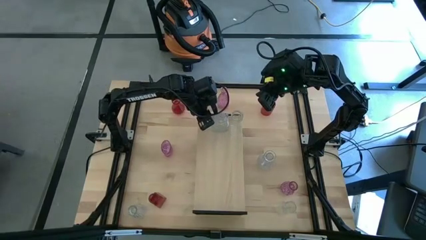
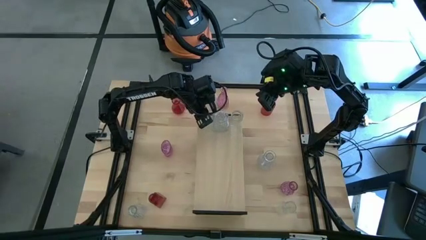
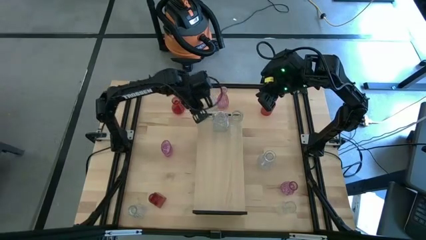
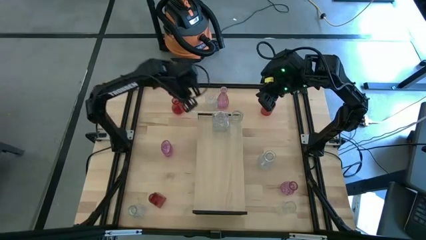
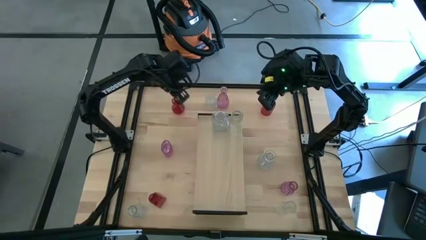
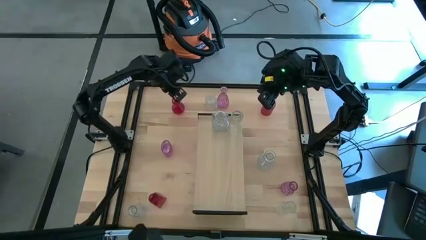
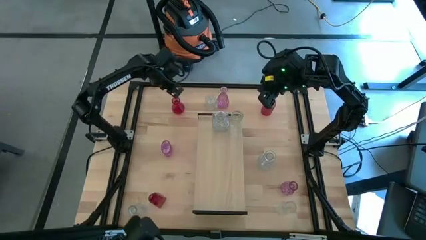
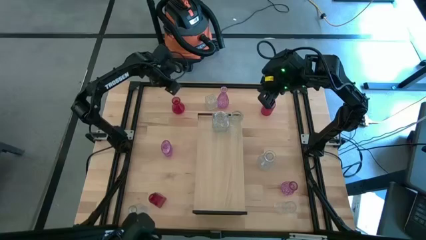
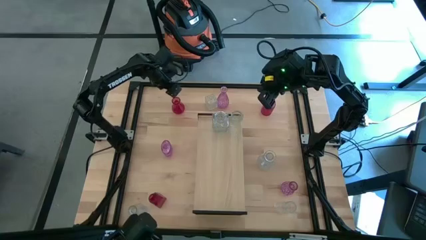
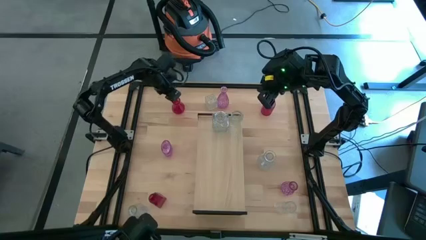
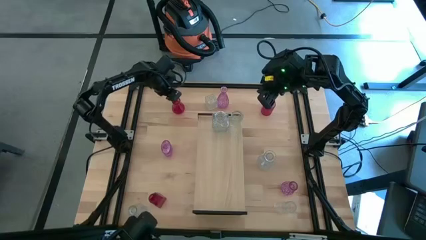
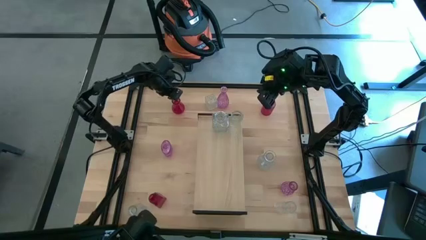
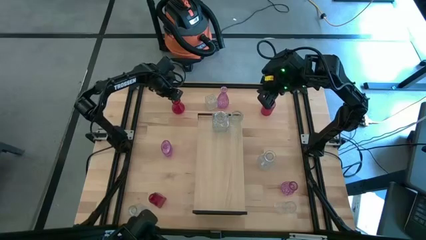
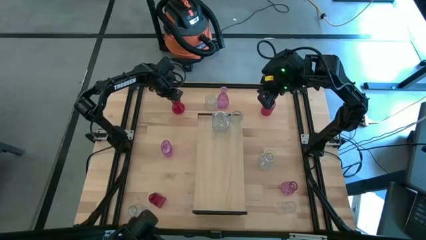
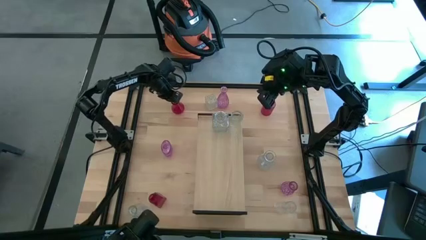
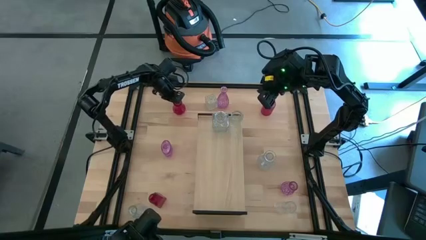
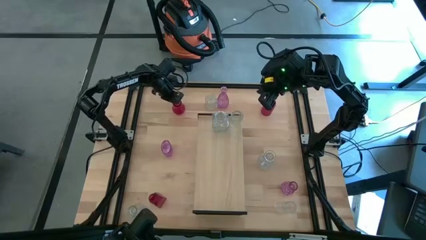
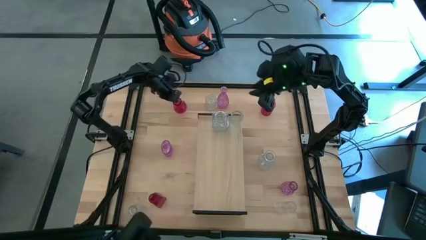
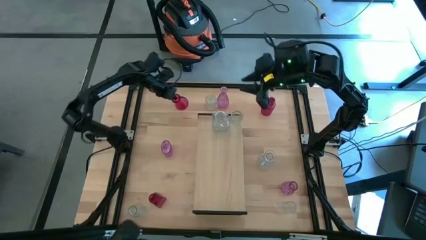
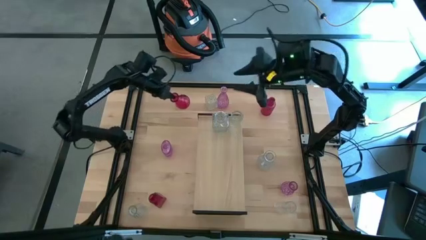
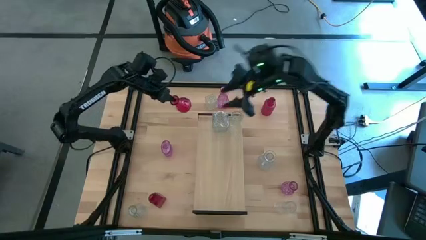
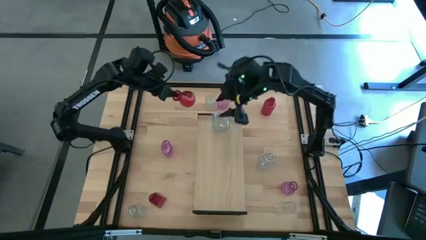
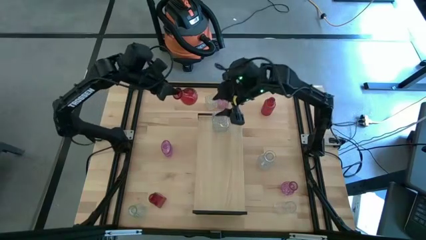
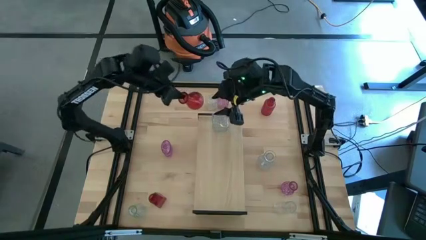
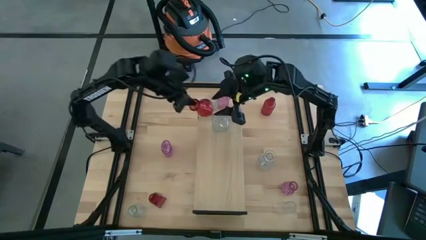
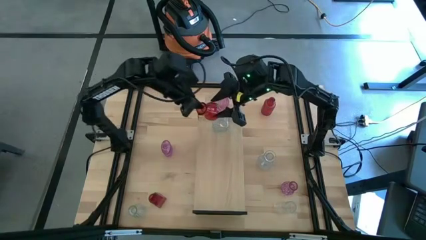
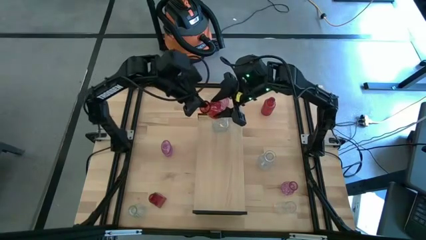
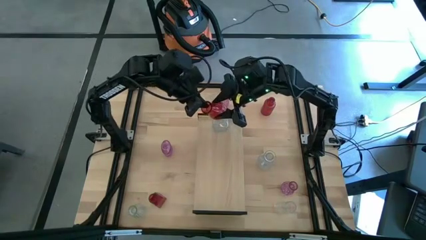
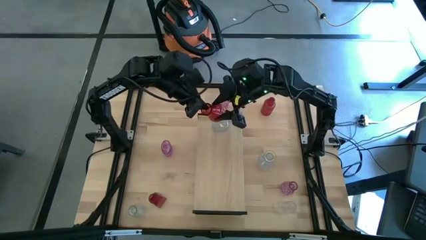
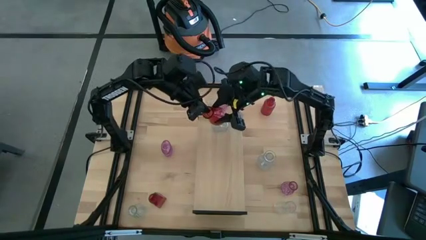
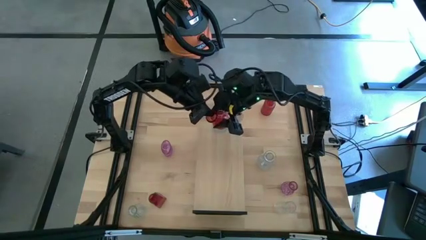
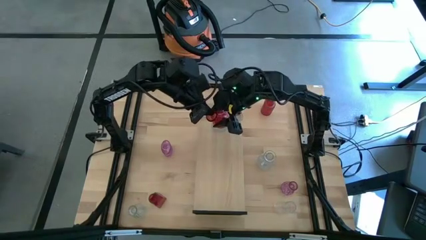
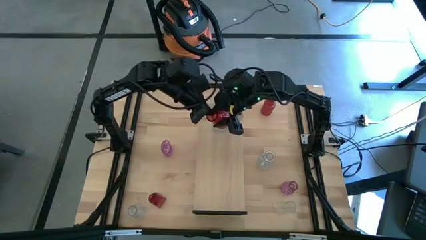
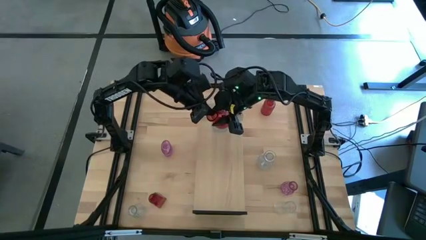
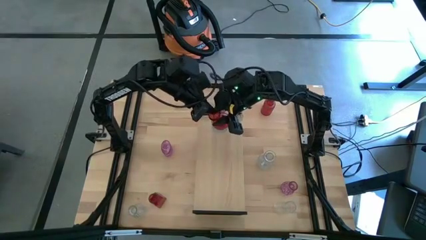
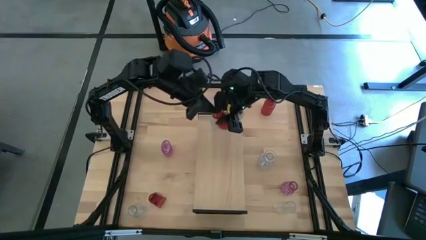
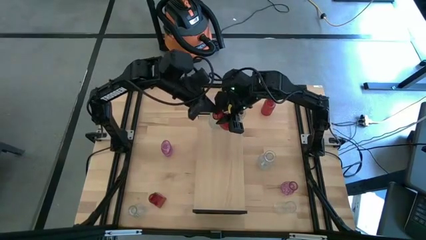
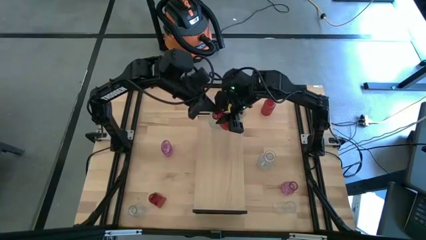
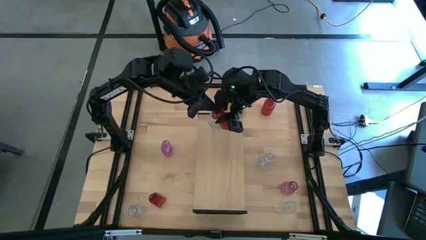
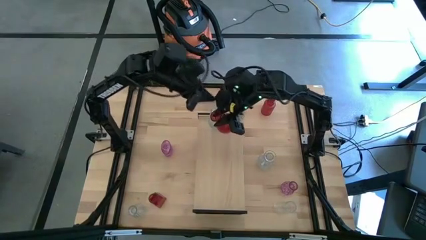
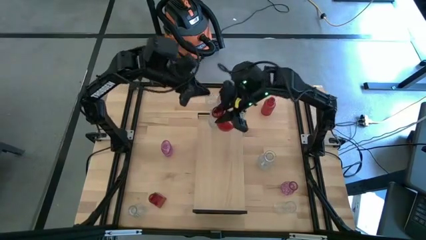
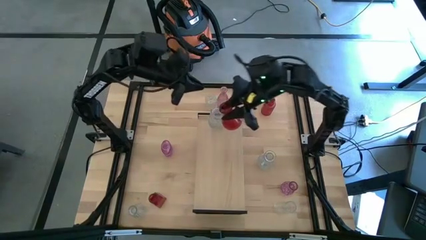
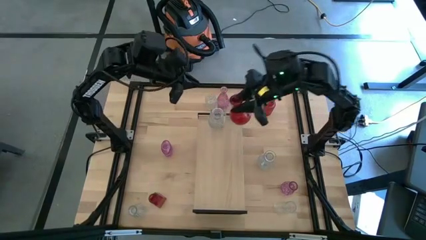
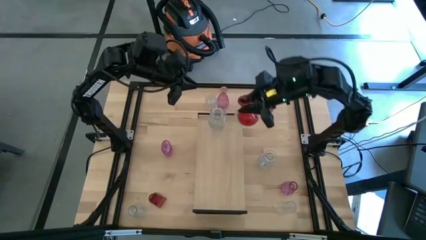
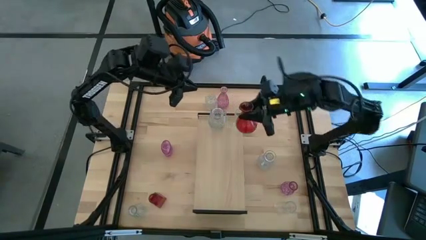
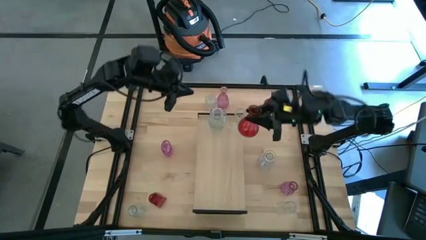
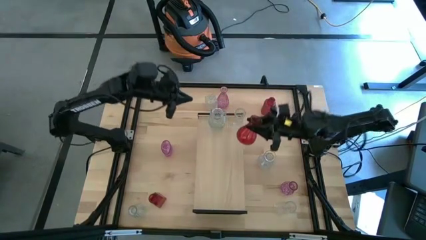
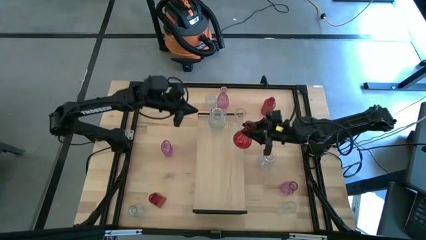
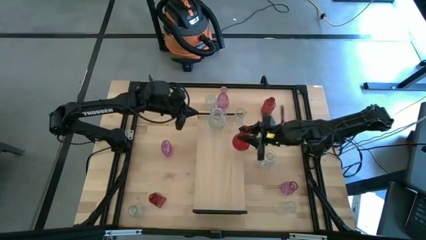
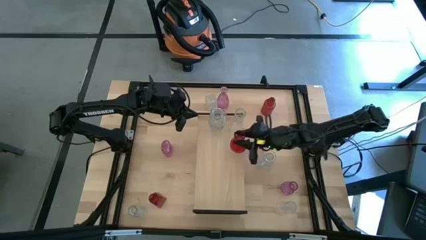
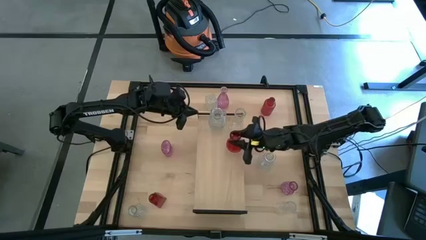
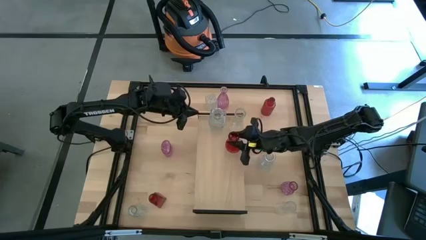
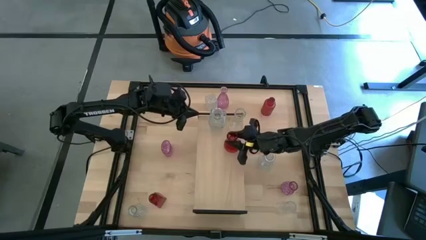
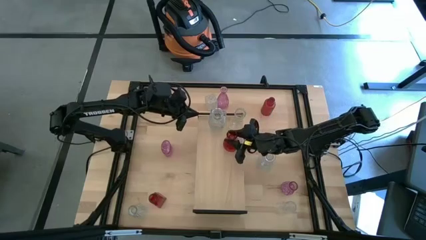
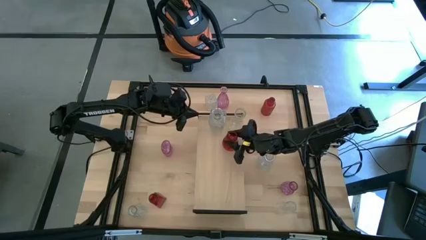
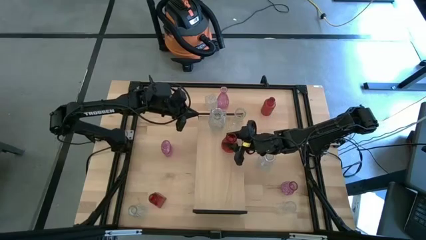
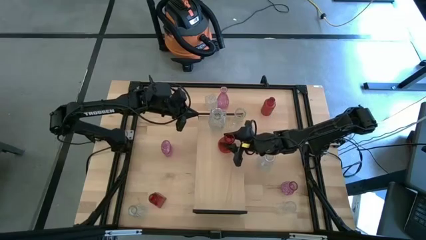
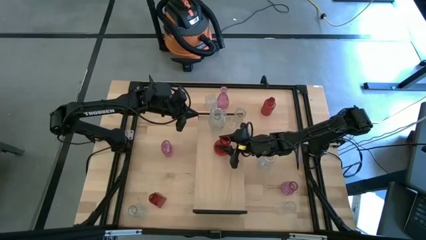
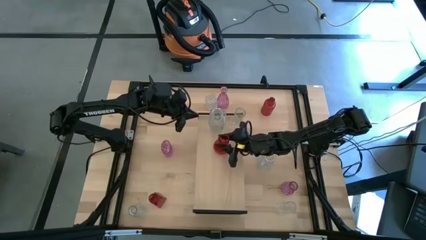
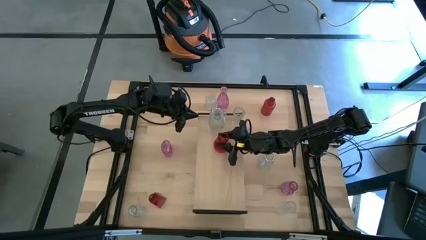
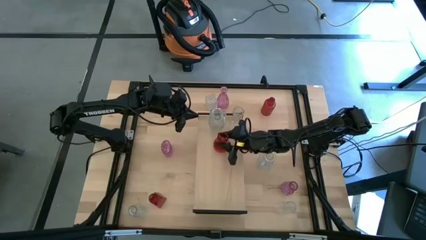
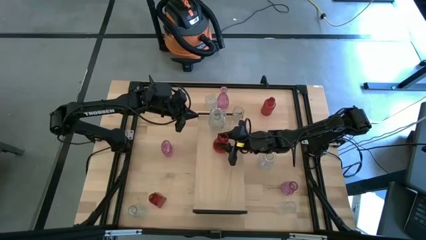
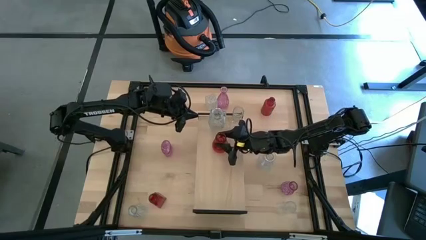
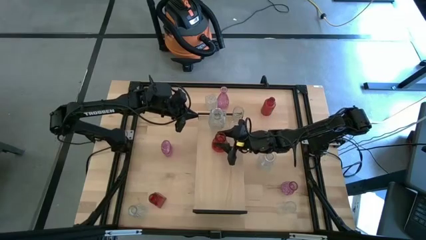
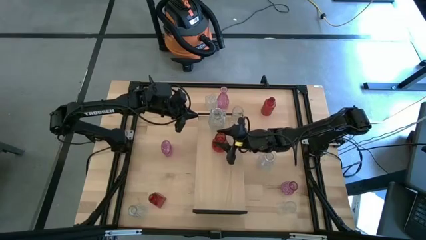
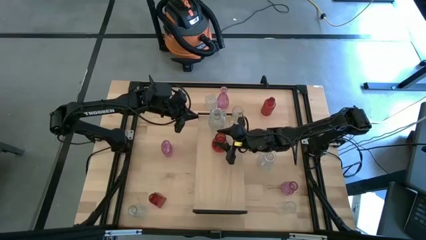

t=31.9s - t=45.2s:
Task: sort vases onto shelf
Put the red vase on the shelf
